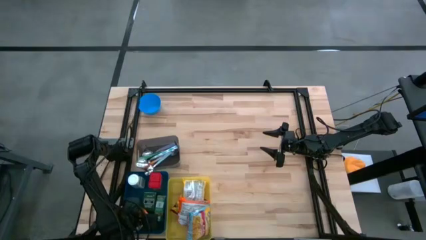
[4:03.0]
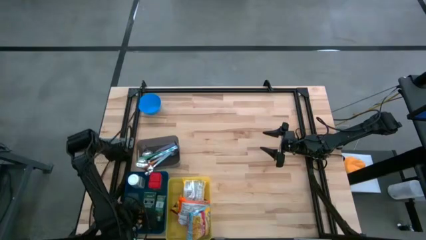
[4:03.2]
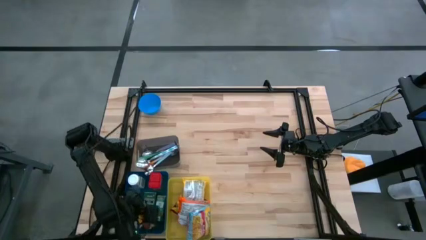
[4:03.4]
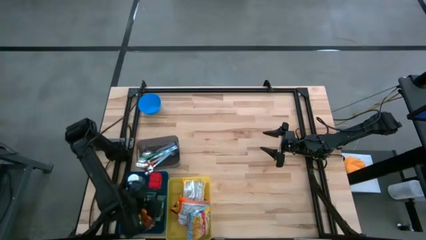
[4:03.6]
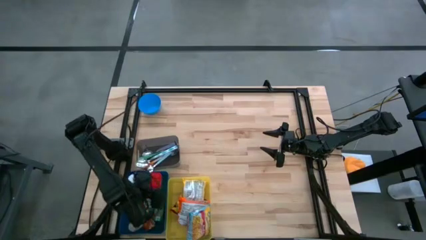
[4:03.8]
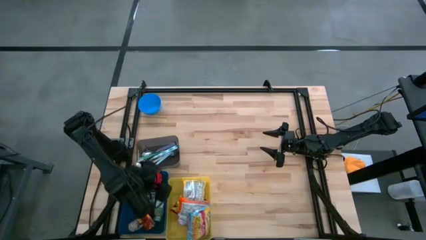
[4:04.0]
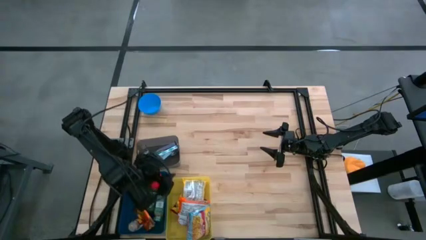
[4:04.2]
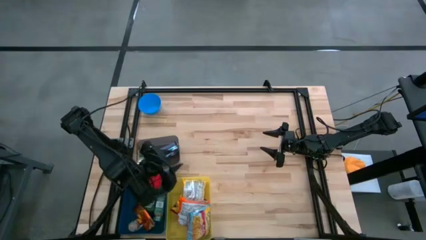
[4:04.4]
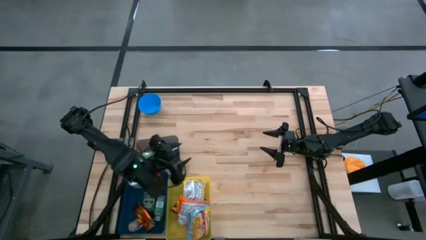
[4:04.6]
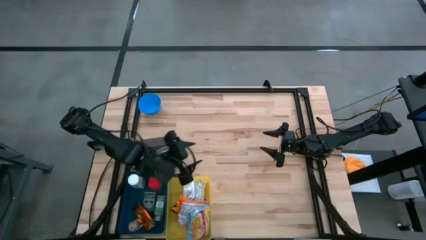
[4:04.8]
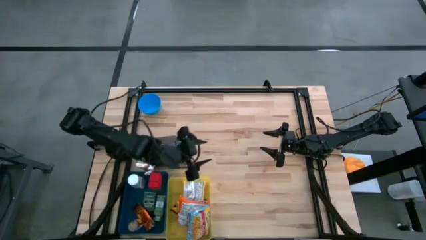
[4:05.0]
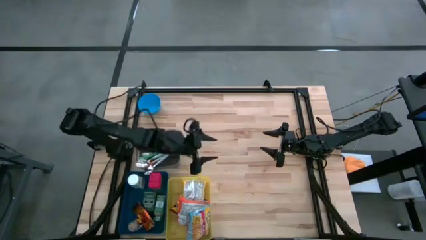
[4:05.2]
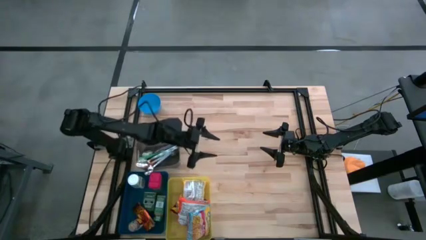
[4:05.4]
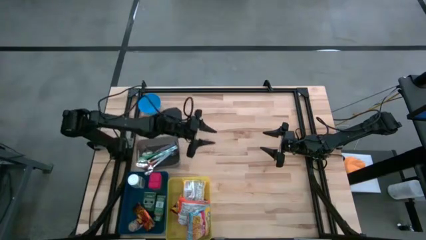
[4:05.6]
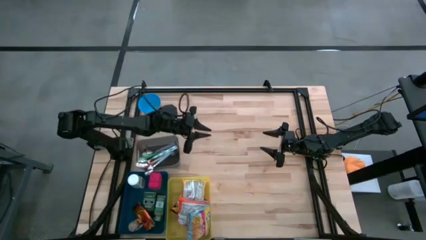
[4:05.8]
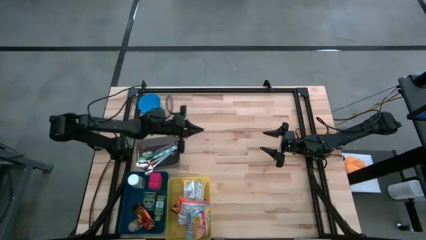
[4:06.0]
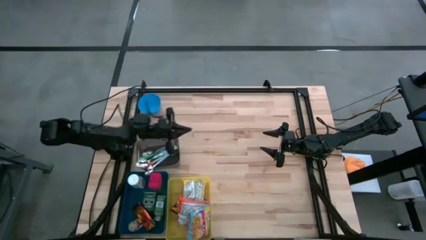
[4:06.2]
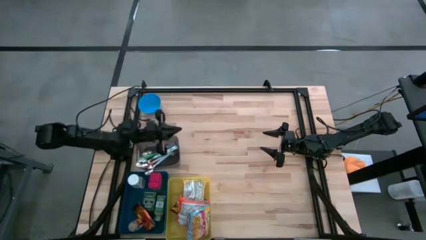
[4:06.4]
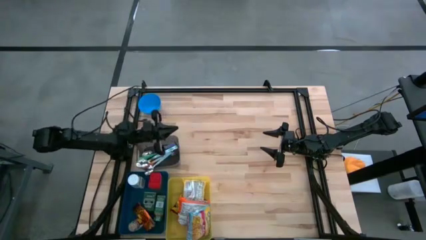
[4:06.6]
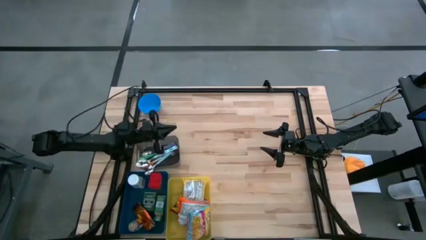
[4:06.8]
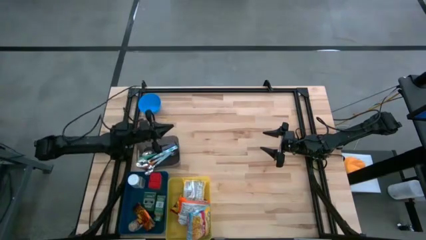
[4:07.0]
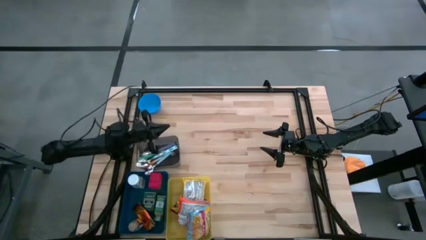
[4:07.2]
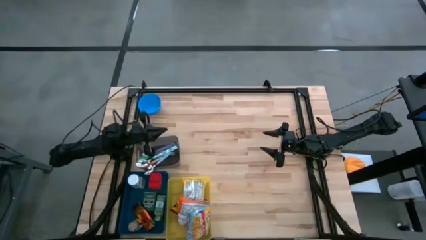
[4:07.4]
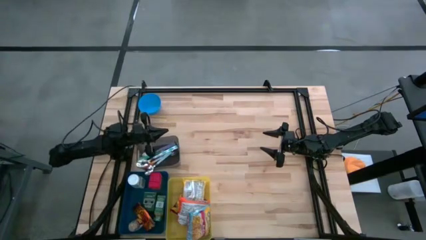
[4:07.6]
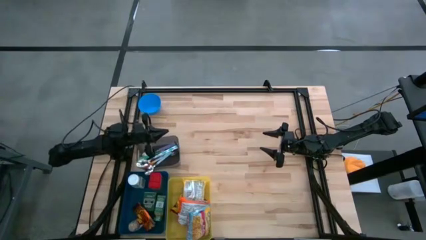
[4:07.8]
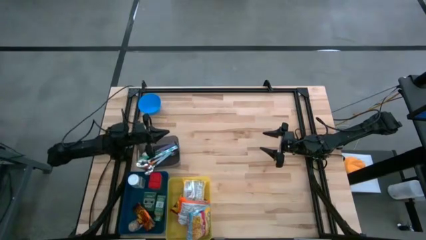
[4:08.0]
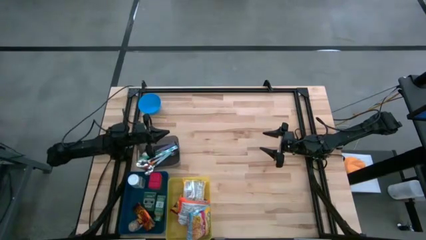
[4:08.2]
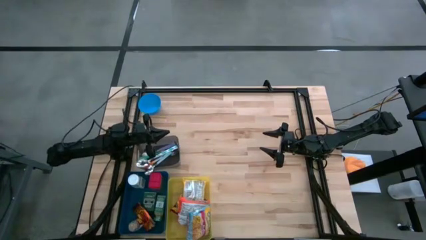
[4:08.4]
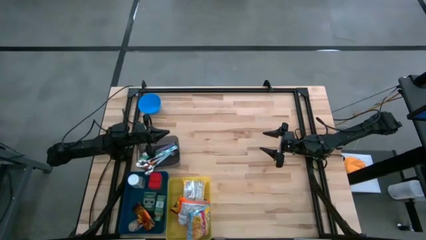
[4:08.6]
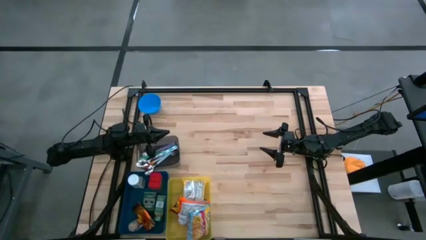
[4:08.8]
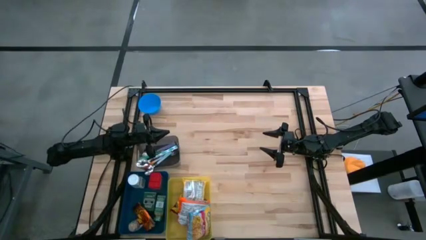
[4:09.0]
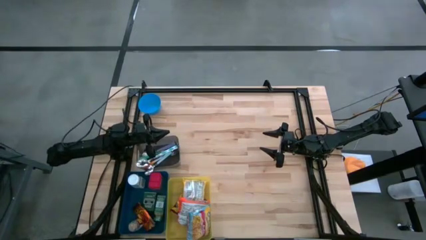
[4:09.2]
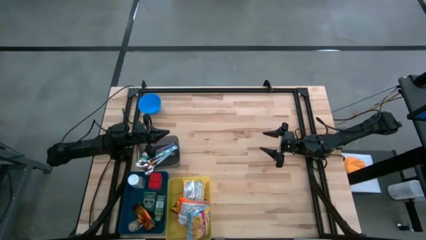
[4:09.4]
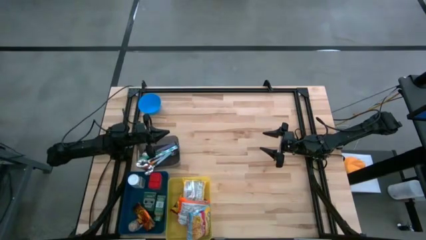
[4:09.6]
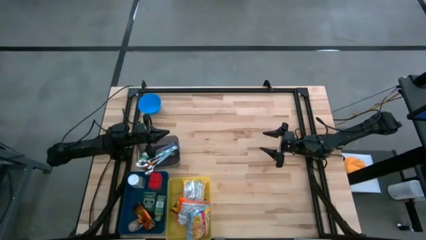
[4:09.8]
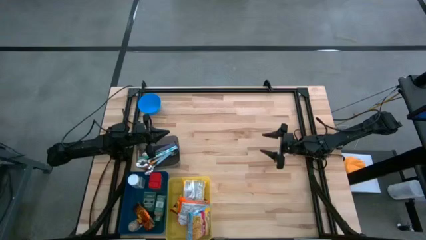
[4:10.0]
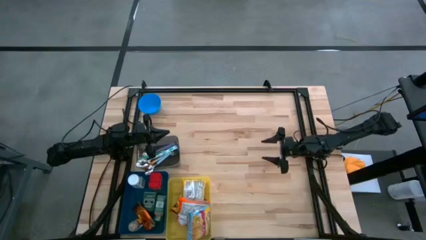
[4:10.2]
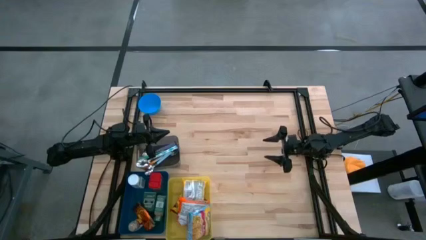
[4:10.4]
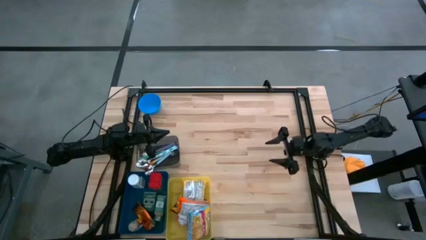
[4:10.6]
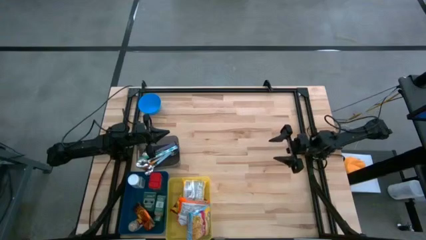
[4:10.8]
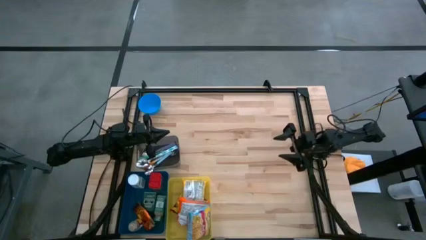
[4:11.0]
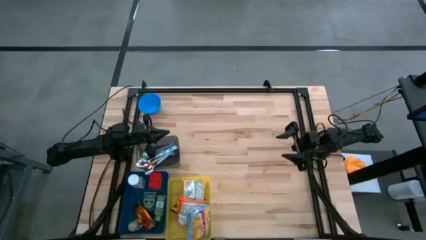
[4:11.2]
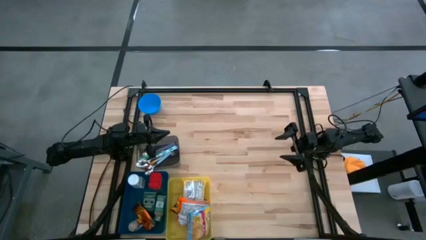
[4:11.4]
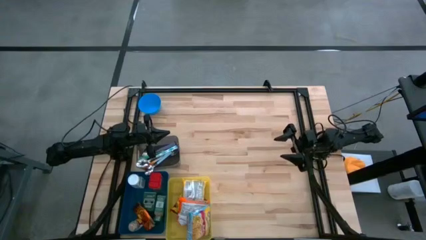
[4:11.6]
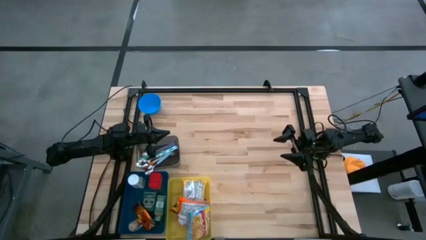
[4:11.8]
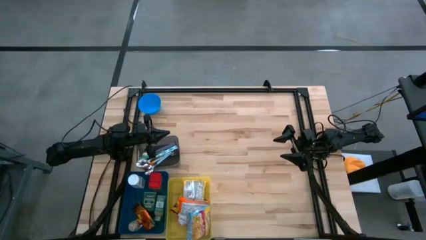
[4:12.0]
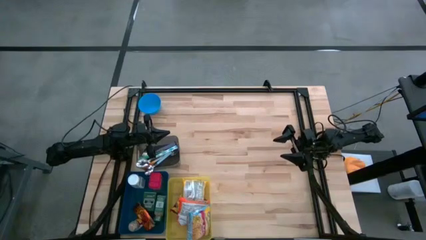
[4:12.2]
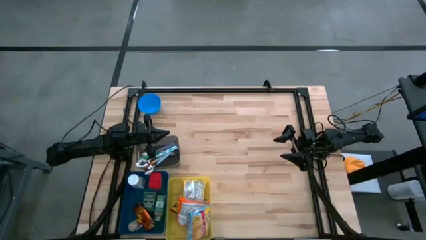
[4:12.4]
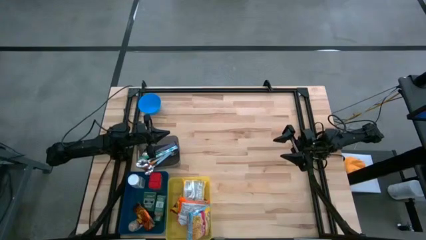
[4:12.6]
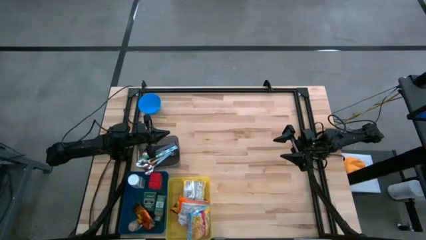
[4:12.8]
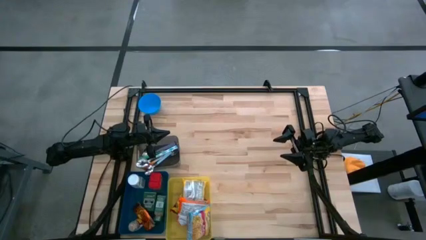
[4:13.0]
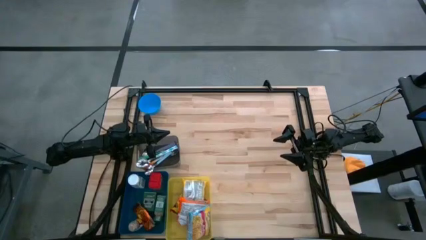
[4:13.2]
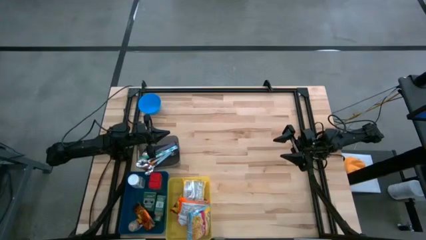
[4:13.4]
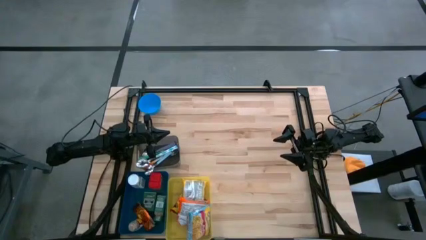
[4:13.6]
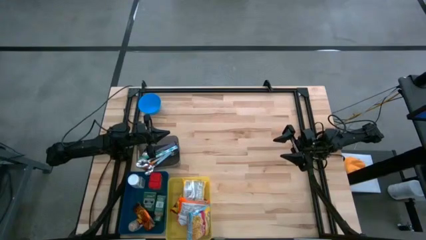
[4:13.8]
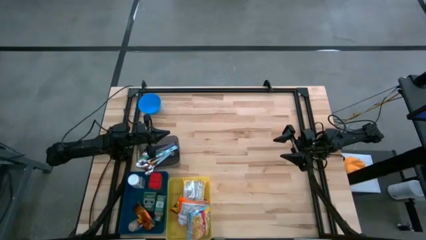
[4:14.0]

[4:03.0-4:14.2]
Return to Home Position

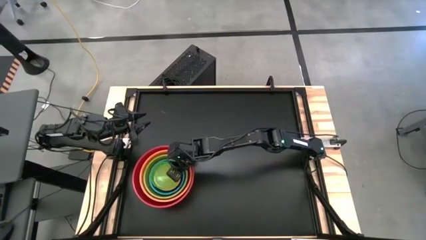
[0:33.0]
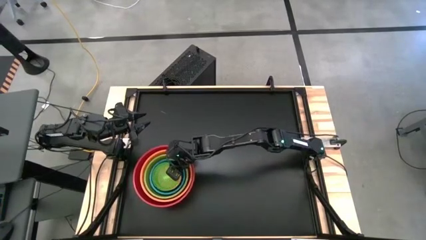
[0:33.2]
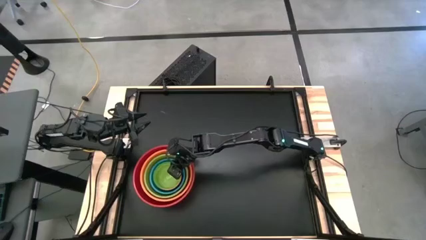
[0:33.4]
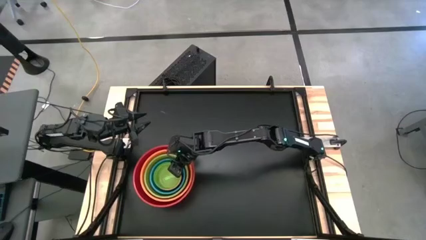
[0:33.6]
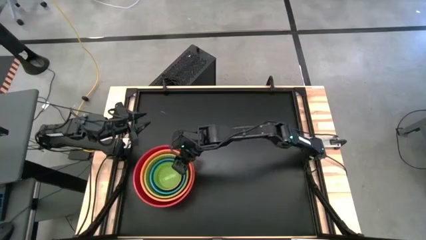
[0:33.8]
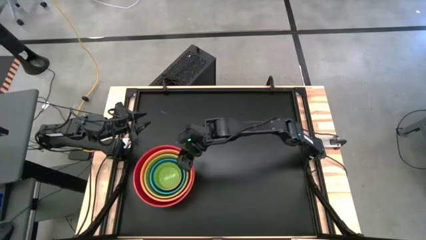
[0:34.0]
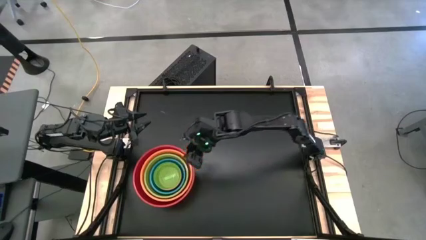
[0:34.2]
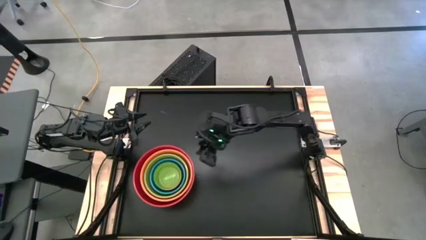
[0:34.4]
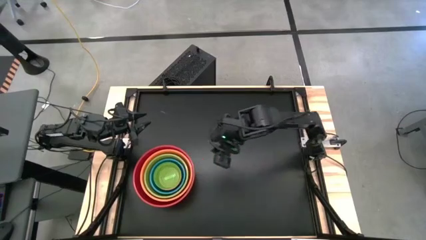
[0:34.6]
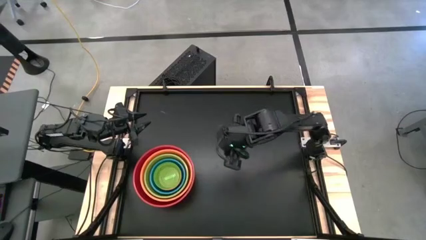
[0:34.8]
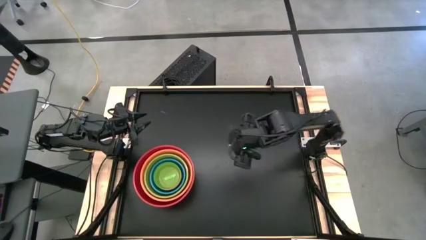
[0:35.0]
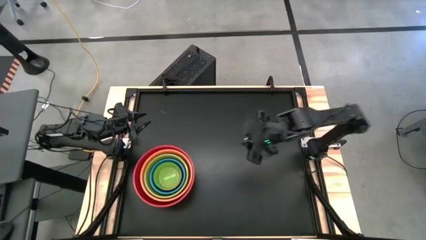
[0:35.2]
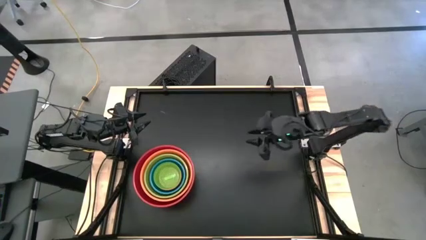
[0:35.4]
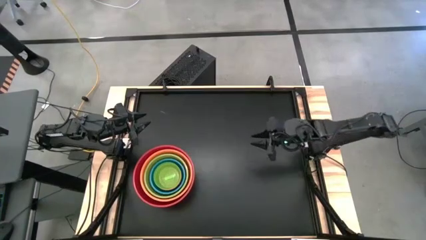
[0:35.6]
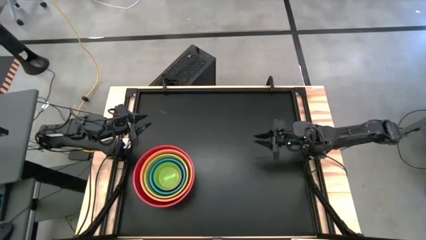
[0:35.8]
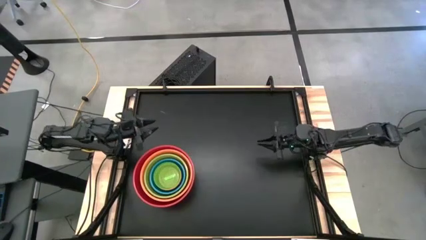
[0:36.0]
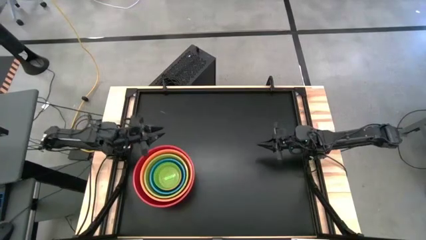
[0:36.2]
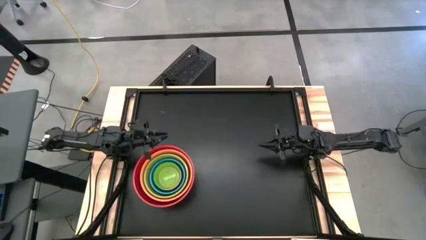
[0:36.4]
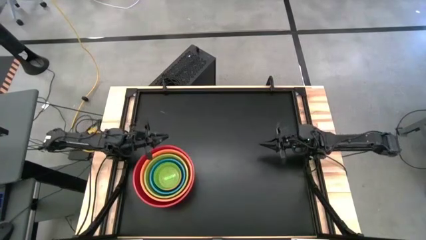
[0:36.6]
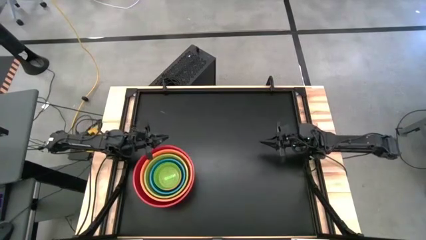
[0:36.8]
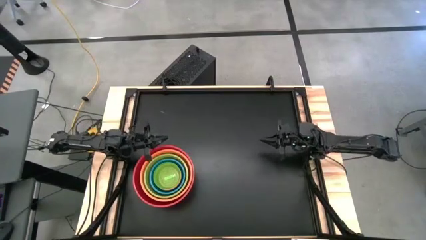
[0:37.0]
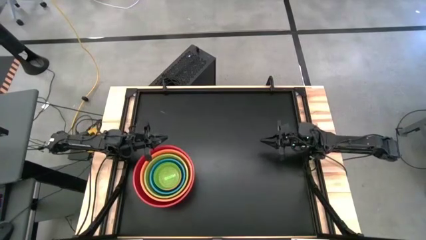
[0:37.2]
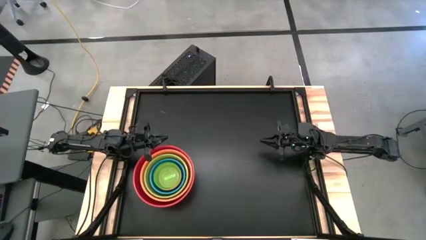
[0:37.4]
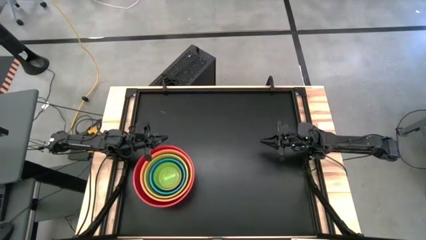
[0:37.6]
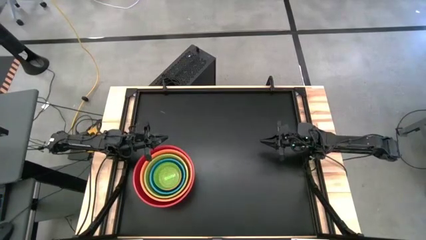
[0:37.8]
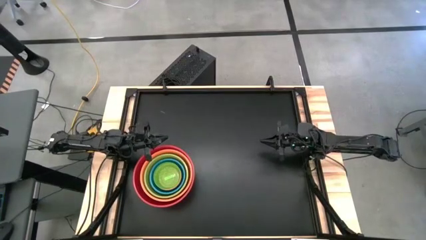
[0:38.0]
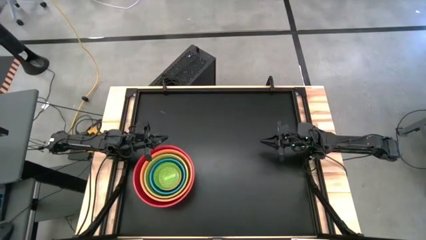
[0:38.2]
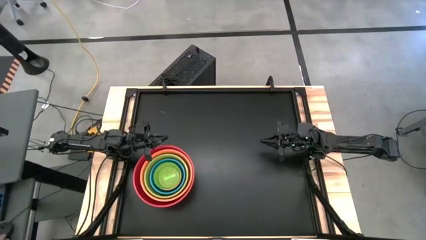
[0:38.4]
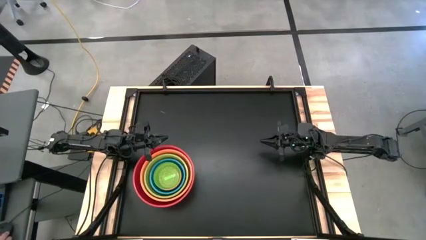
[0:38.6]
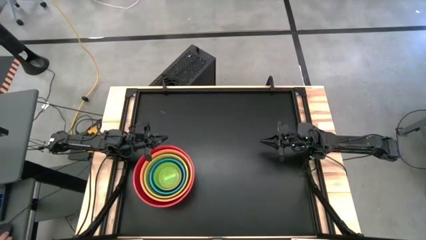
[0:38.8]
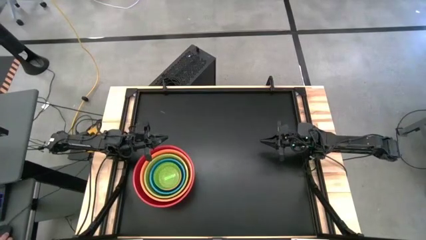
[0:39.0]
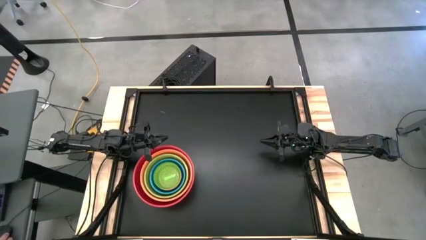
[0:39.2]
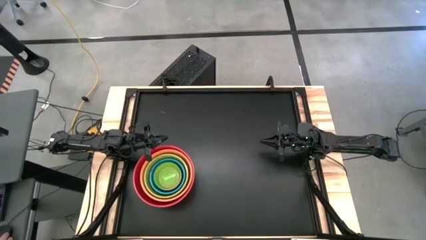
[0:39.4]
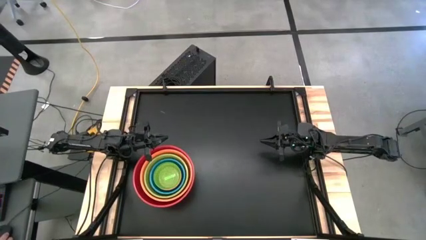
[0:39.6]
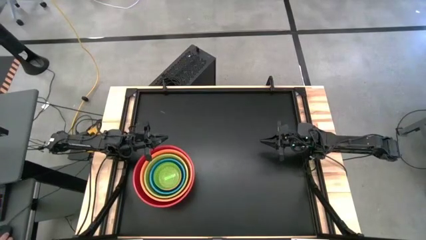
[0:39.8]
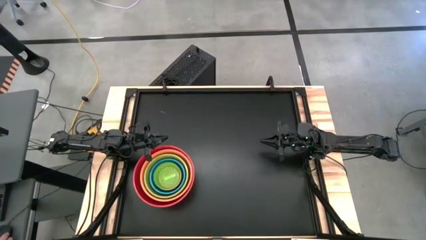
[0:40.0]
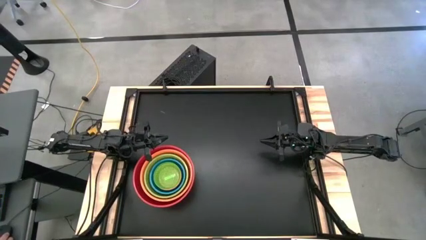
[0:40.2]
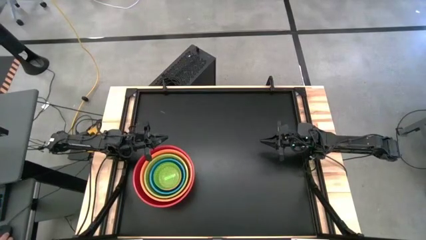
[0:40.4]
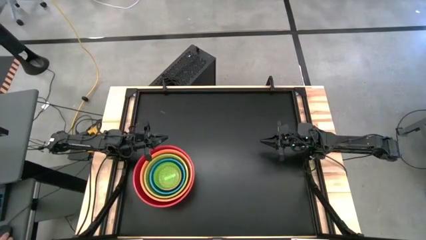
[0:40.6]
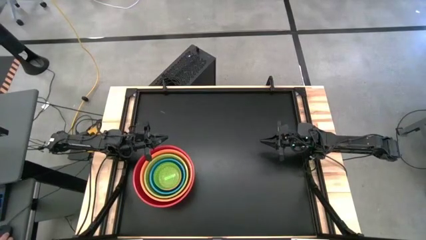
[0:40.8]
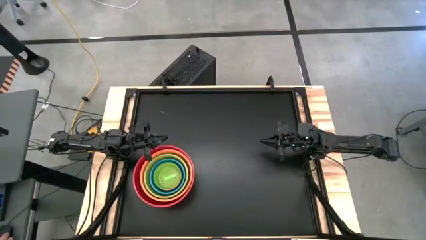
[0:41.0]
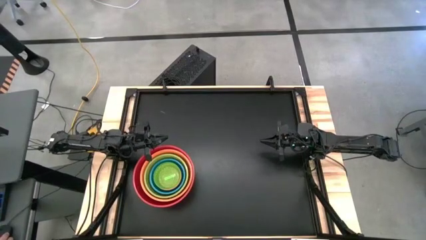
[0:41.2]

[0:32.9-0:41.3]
Return to Home Position
